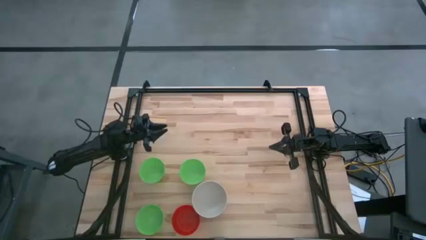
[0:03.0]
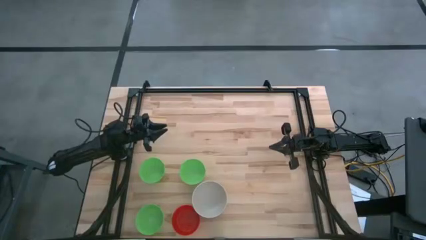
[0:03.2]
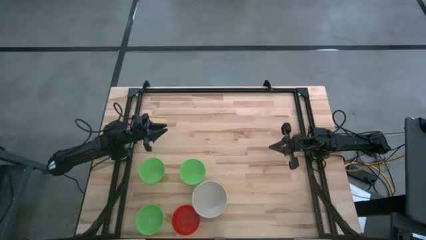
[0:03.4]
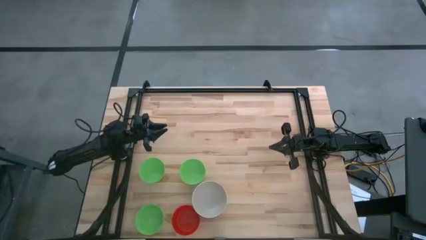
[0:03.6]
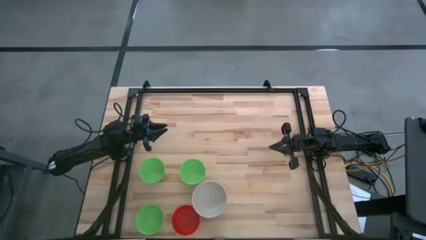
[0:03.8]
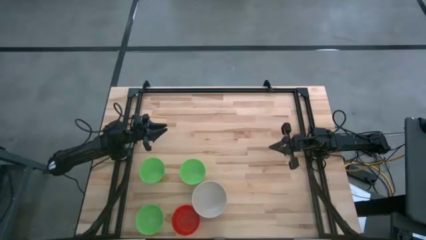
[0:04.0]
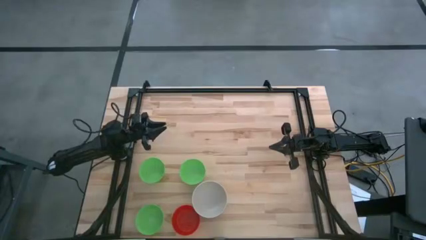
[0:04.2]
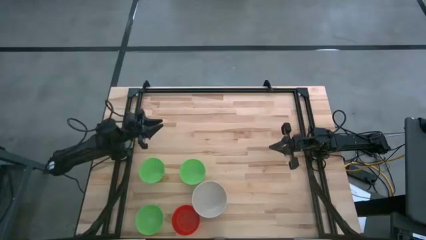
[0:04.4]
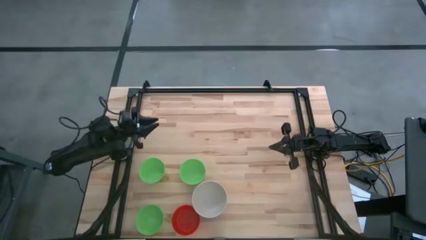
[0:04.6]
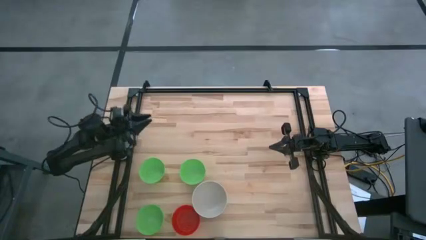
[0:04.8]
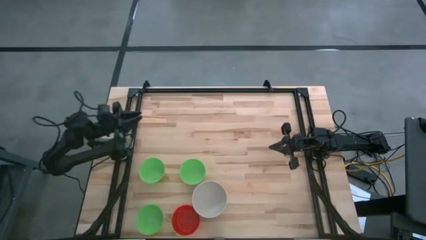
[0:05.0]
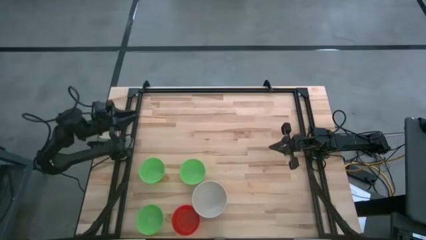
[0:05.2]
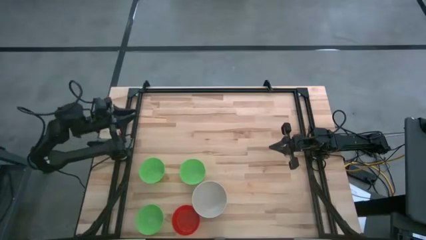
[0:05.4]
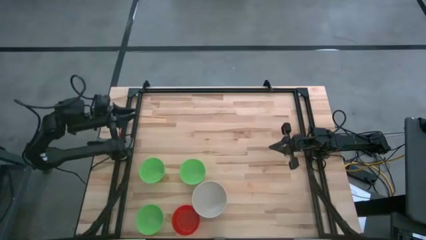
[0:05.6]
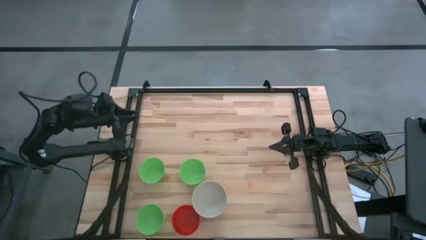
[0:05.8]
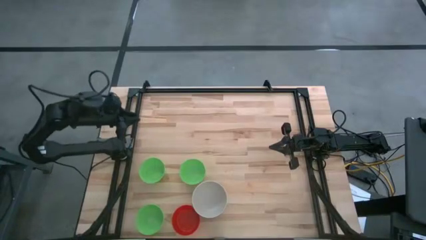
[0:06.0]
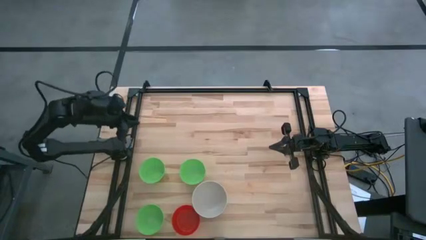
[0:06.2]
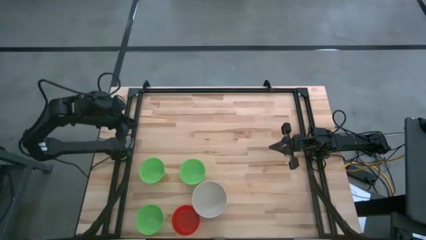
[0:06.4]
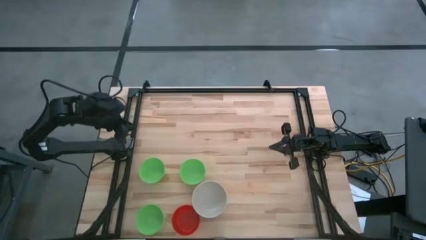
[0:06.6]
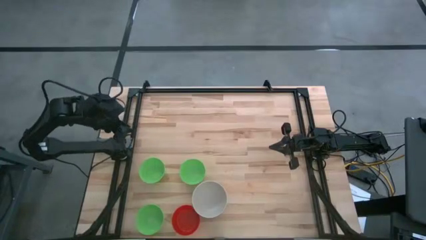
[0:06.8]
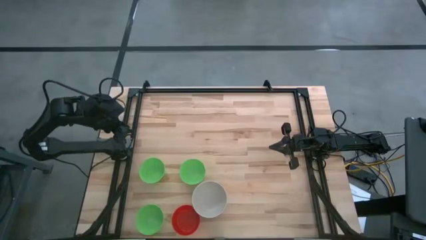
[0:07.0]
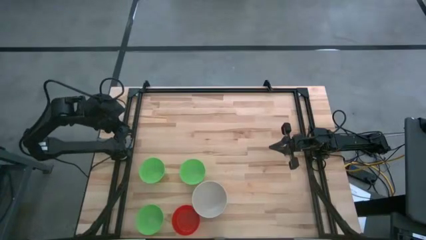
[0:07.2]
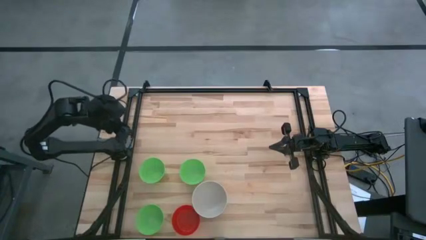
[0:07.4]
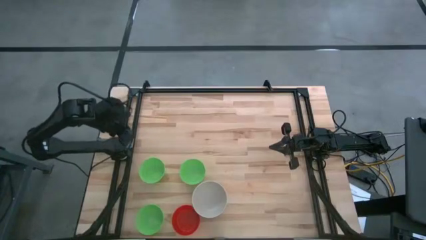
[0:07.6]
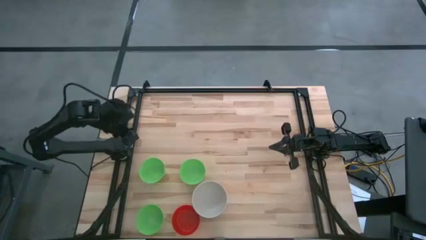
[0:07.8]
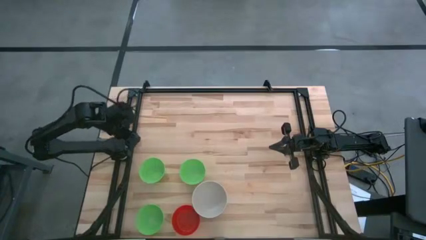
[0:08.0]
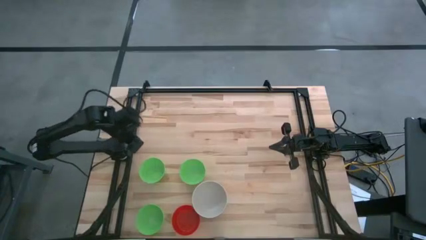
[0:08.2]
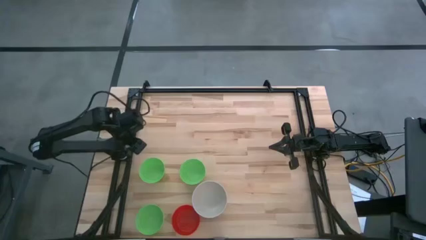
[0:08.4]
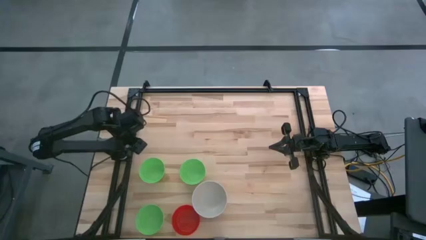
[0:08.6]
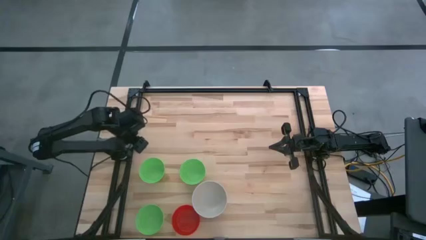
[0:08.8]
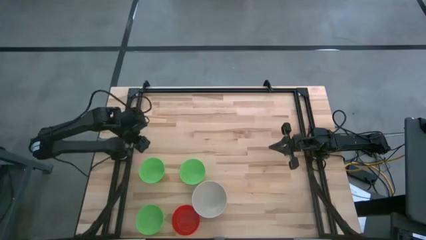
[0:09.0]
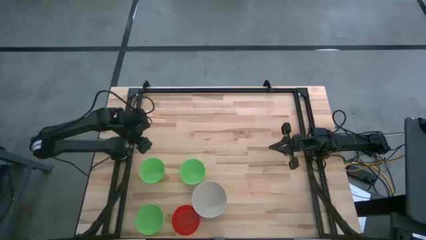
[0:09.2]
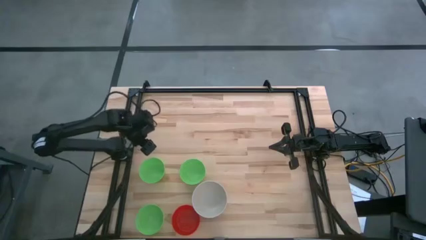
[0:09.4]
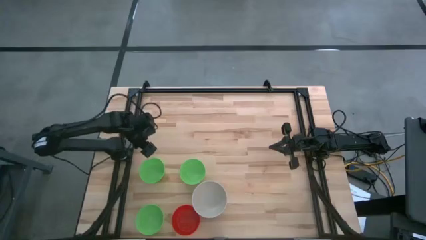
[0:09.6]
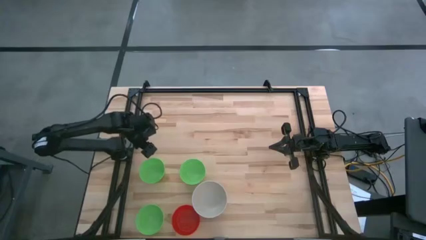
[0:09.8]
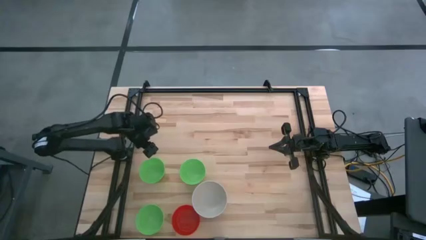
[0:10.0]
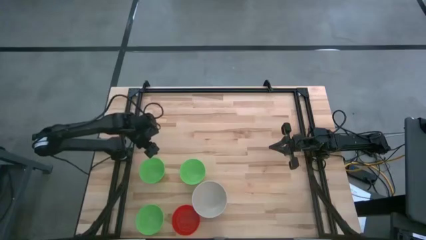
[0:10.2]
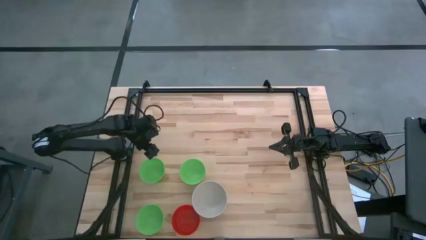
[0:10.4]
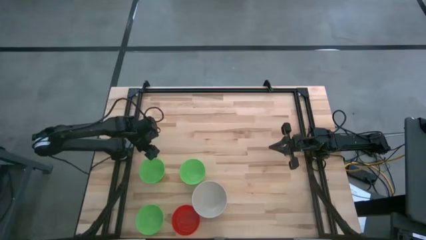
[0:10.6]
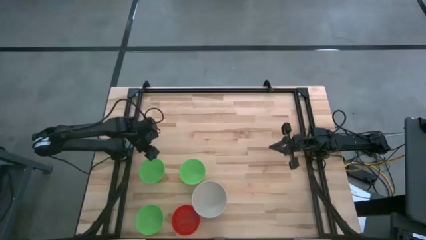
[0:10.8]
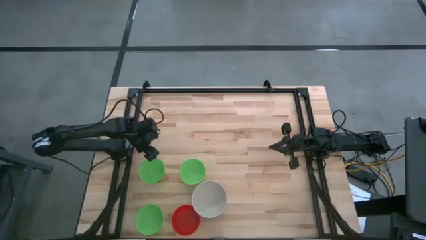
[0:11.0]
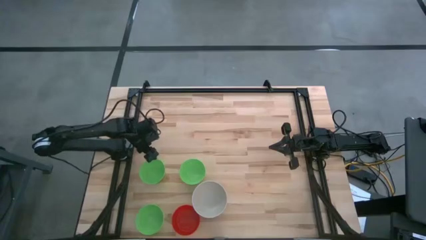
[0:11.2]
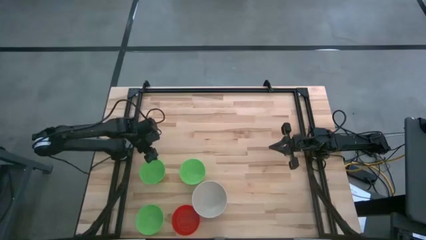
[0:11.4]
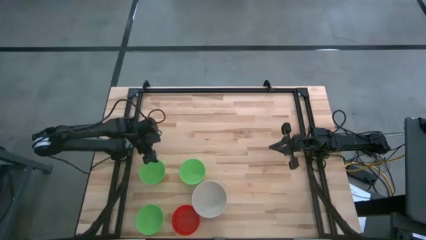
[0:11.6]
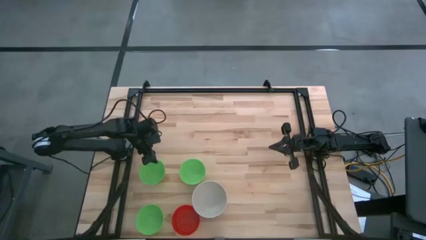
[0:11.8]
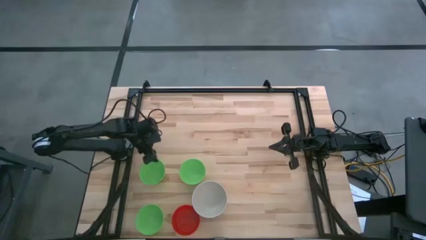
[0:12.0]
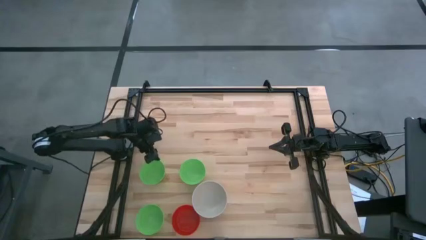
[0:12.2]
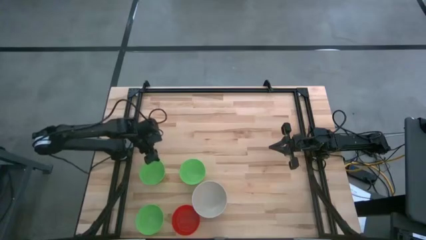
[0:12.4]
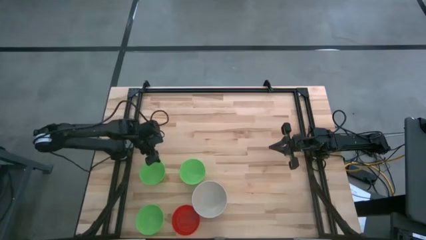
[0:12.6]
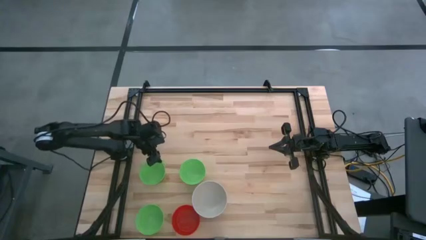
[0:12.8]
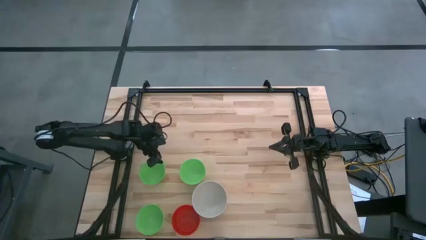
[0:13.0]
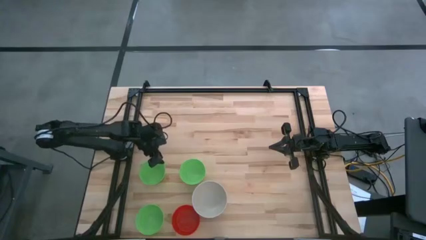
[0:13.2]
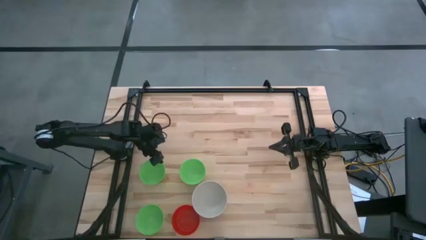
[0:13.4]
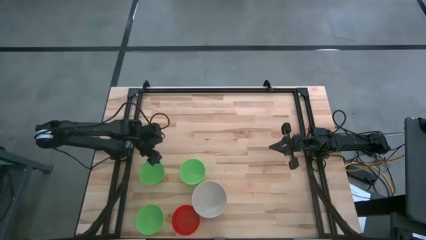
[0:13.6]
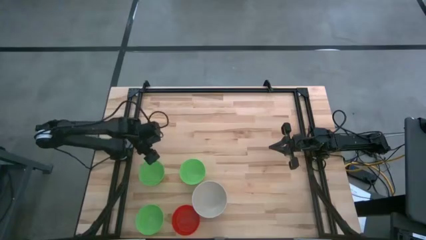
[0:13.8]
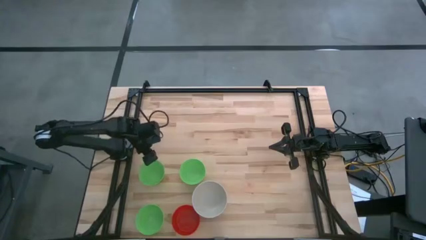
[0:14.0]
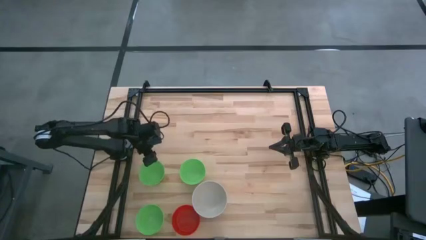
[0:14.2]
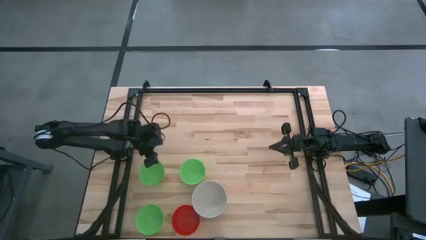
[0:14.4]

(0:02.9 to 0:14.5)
Stack the top left green bowl on top of the white bowl
